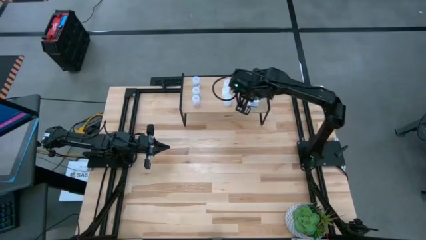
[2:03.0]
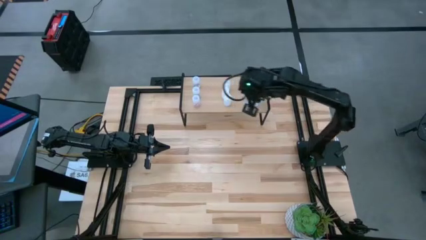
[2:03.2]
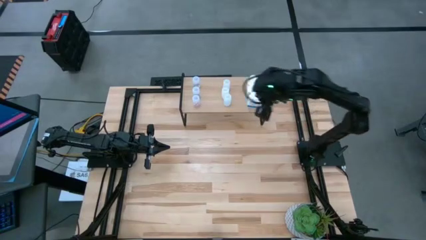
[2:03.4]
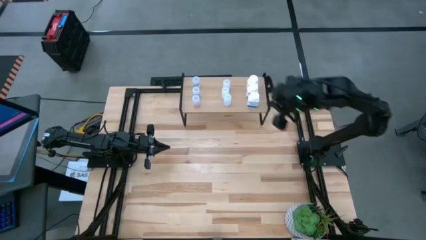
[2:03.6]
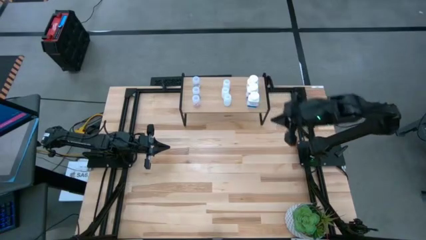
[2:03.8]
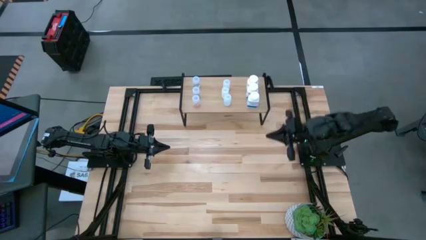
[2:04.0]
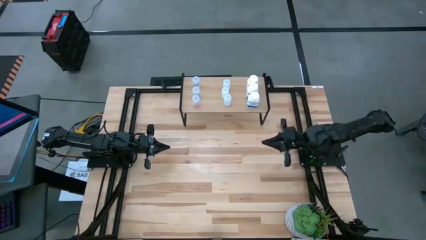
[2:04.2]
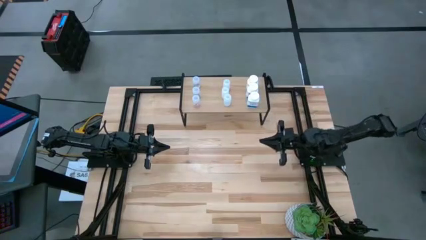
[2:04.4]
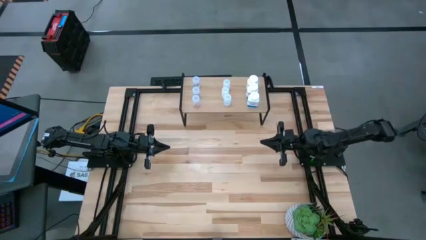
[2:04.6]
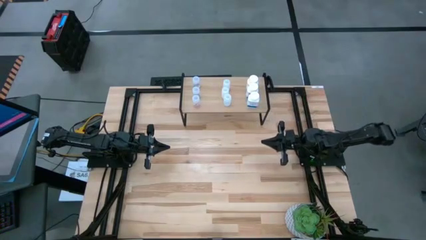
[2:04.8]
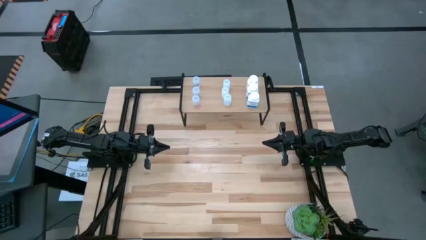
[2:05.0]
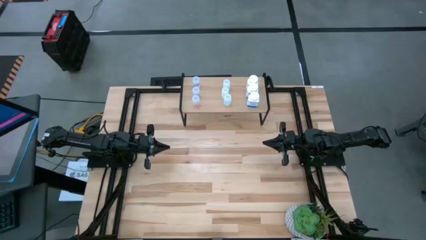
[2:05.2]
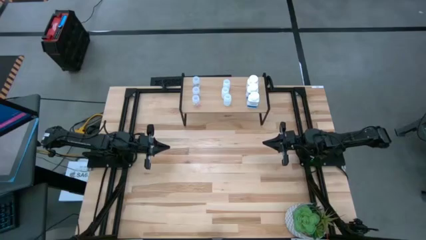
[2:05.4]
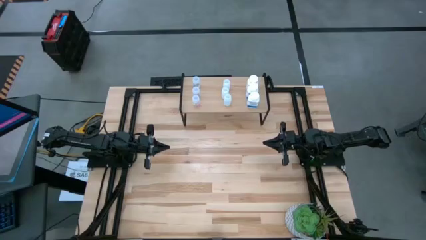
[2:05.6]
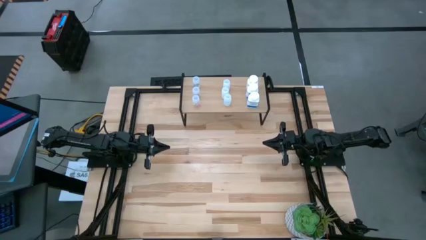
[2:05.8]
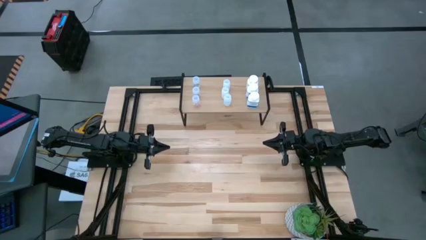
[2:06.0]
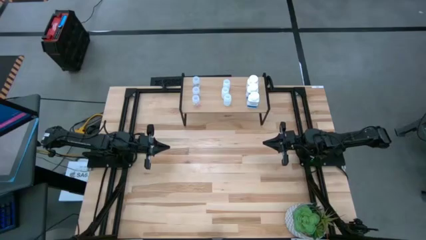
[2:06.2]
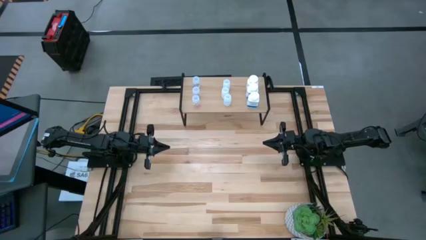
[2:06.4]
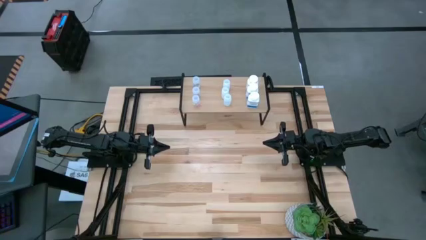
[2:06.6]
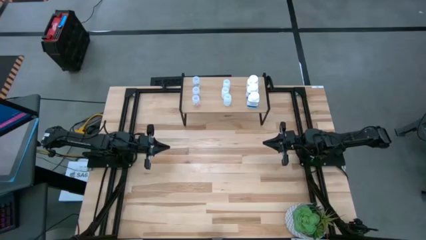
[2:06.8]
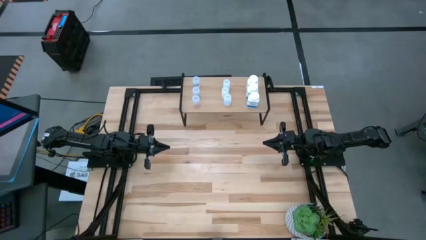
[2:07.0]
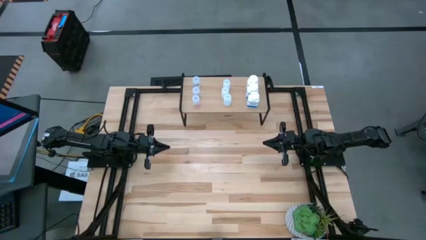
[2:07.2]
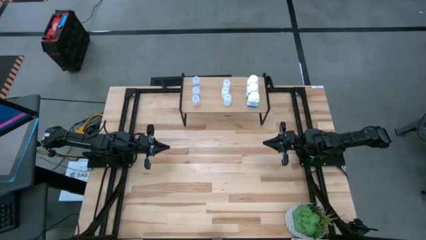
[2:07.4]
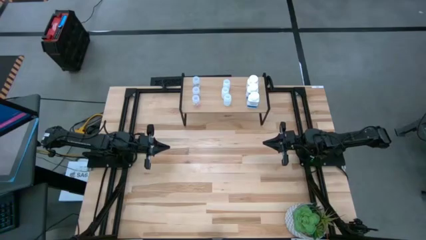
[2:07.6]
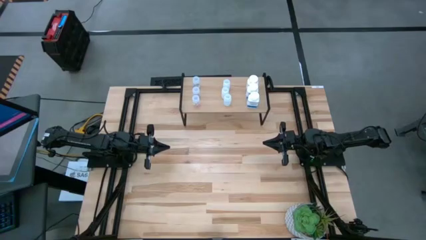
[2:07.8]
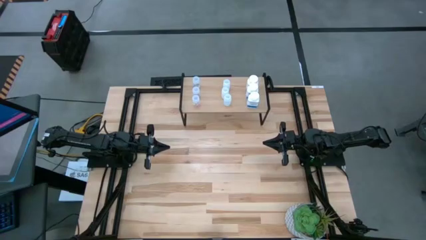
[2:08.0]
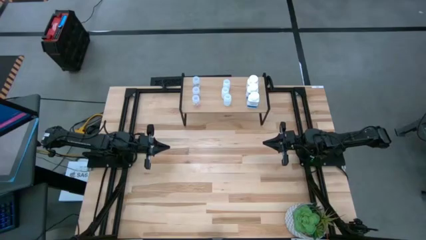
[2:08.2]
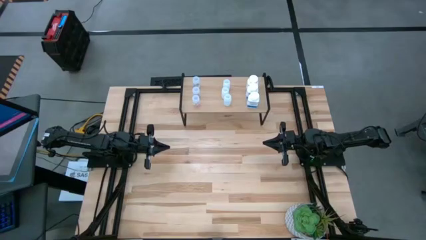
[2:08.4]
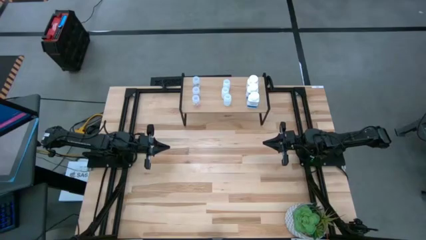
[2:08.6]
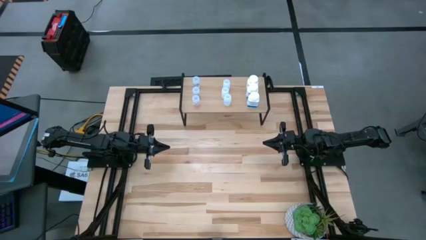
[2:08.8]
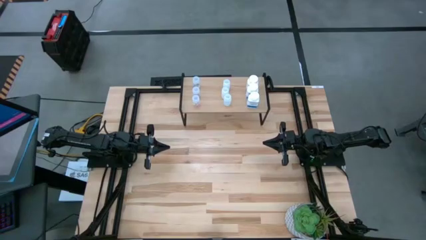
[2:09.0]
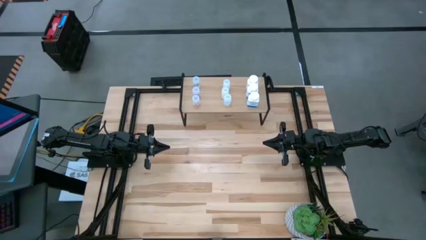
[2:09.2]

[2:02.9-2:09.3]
Task: Pick and place medicine bottles onto shelf by color
Return to Home Position

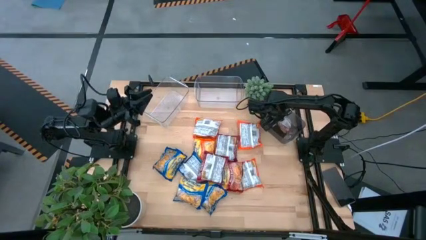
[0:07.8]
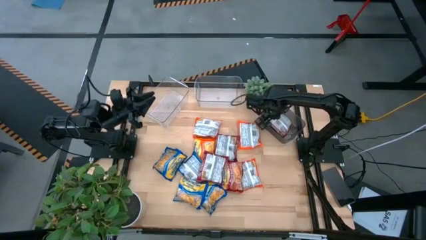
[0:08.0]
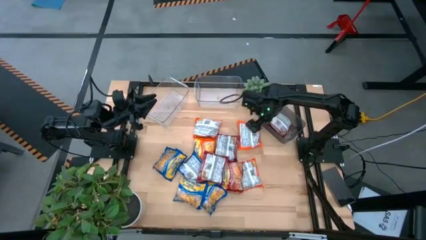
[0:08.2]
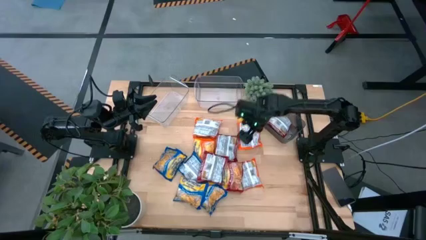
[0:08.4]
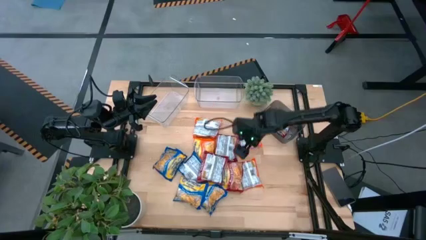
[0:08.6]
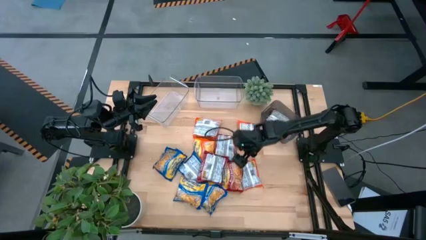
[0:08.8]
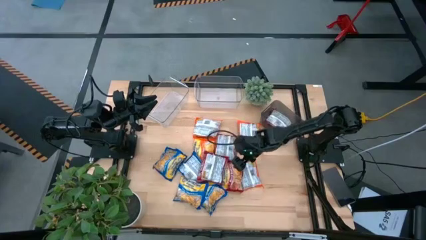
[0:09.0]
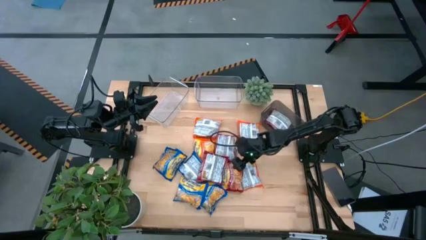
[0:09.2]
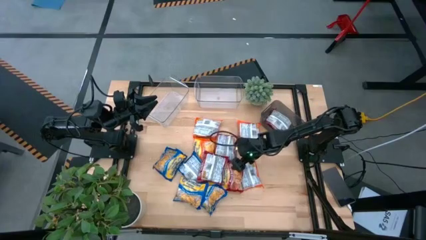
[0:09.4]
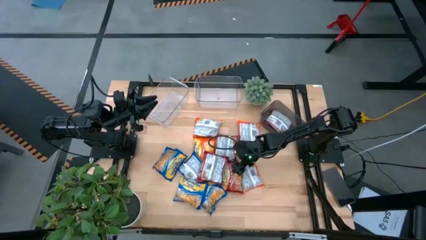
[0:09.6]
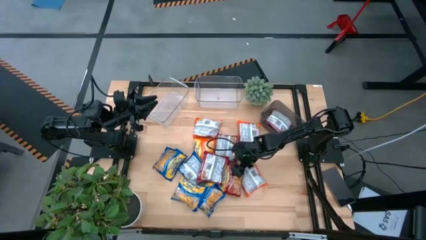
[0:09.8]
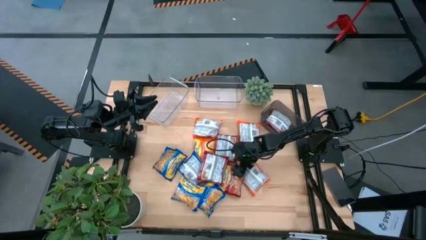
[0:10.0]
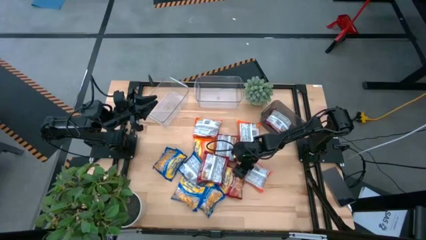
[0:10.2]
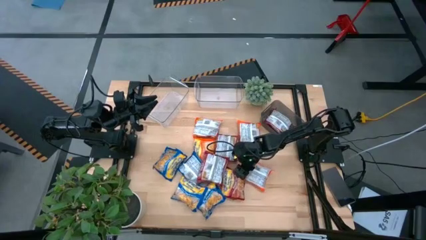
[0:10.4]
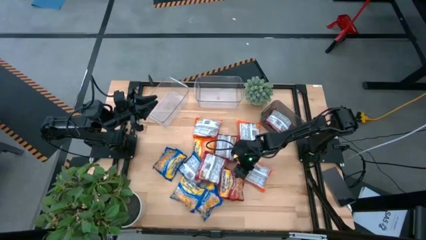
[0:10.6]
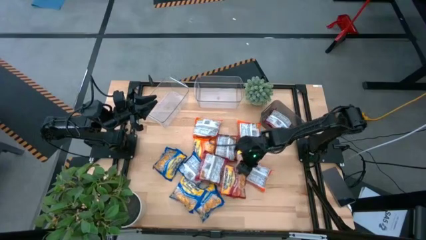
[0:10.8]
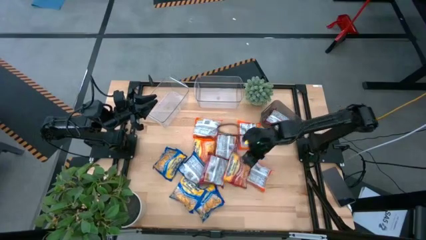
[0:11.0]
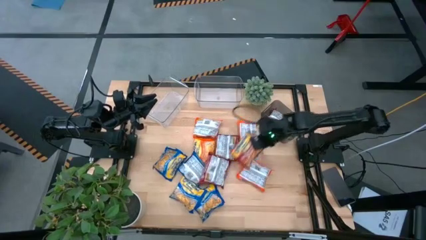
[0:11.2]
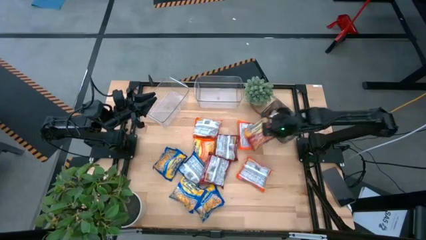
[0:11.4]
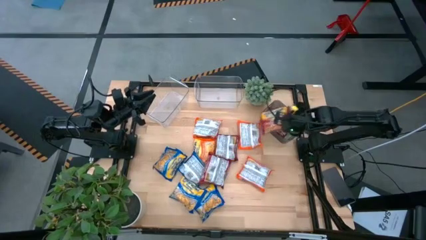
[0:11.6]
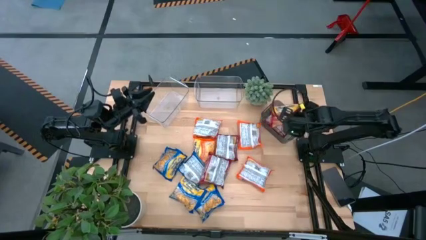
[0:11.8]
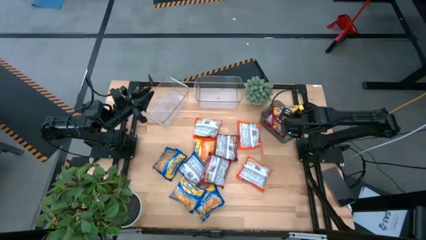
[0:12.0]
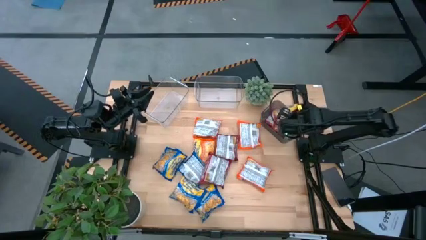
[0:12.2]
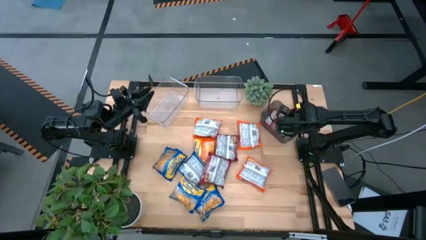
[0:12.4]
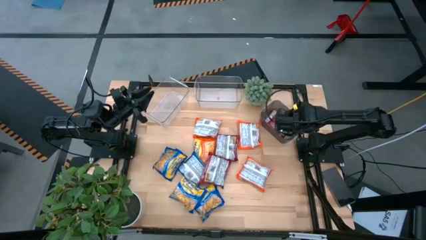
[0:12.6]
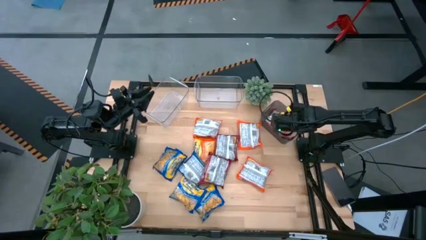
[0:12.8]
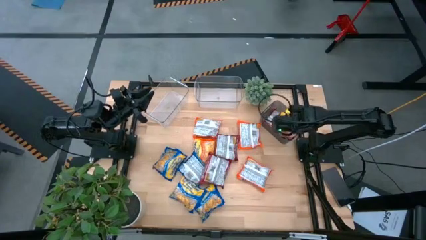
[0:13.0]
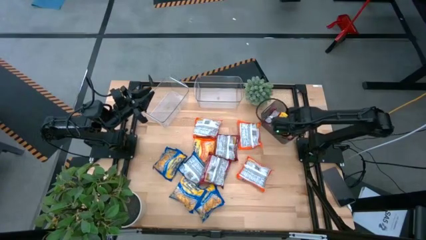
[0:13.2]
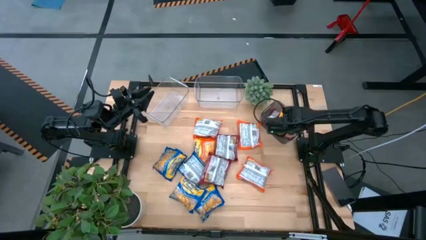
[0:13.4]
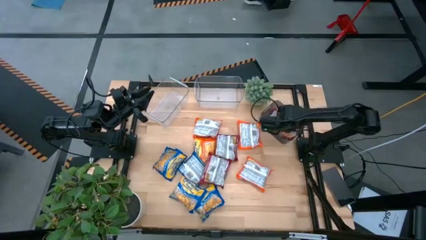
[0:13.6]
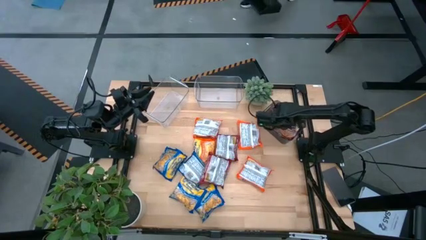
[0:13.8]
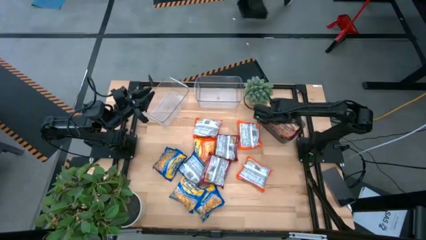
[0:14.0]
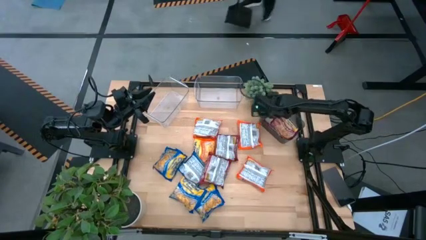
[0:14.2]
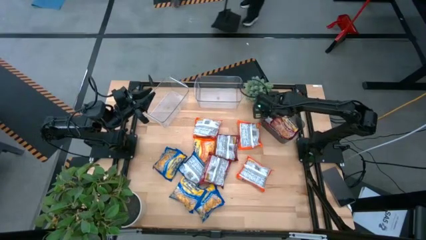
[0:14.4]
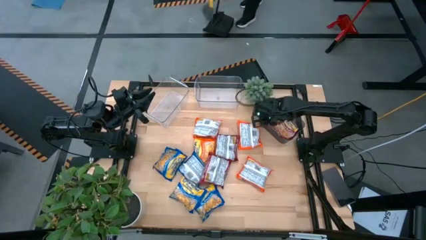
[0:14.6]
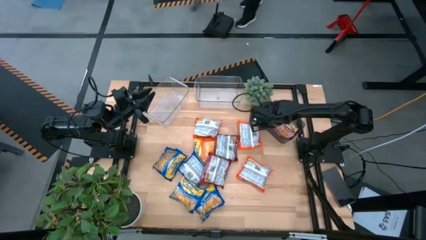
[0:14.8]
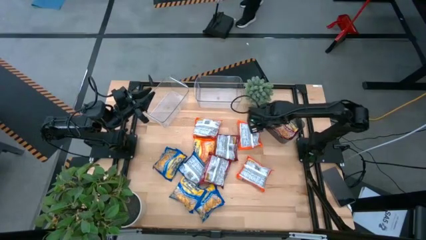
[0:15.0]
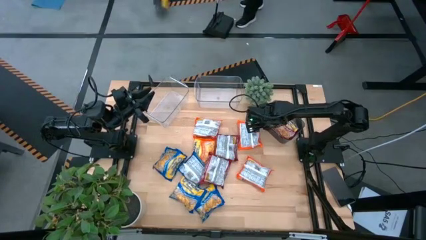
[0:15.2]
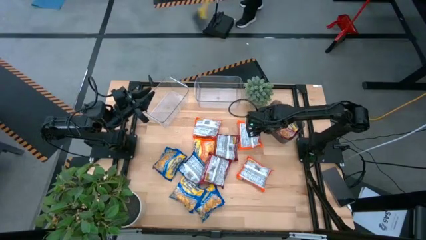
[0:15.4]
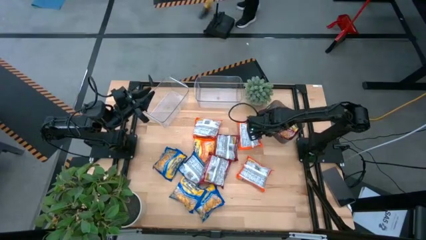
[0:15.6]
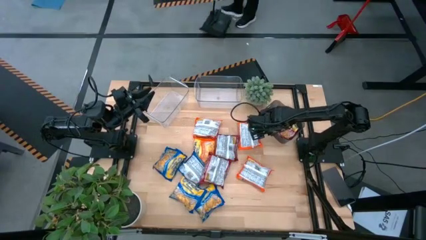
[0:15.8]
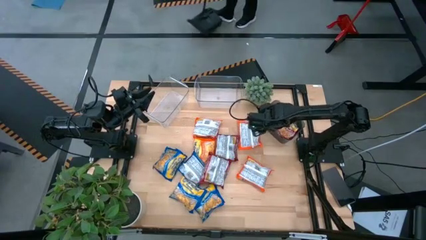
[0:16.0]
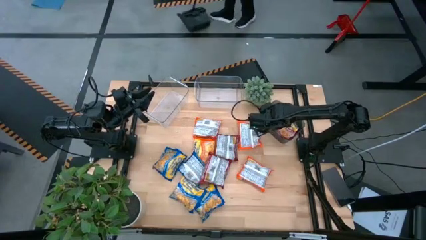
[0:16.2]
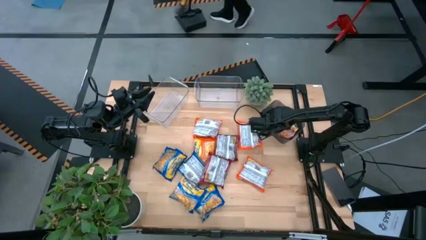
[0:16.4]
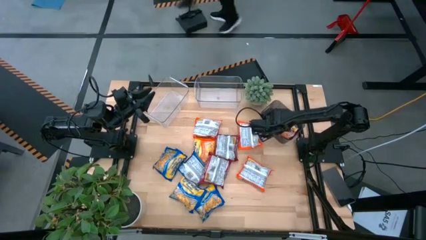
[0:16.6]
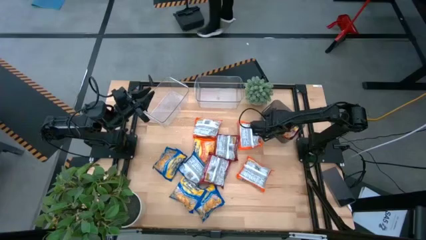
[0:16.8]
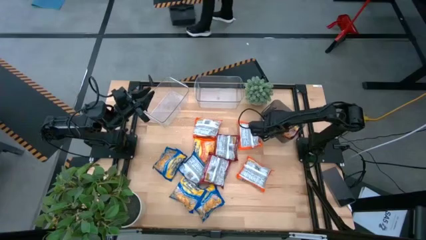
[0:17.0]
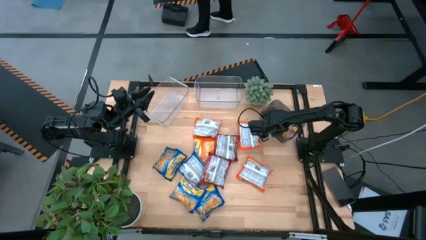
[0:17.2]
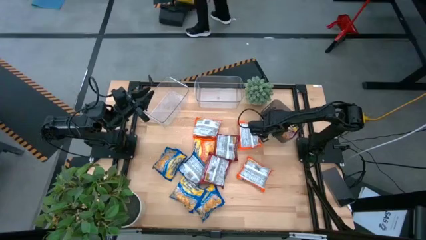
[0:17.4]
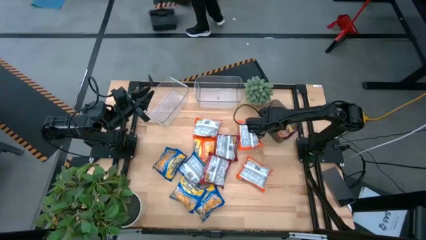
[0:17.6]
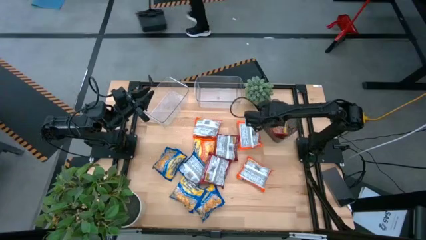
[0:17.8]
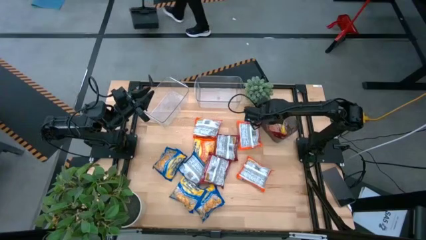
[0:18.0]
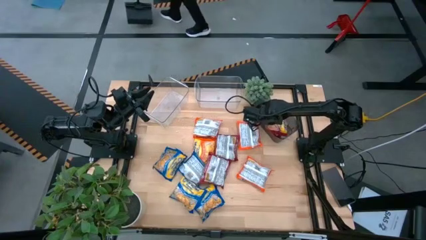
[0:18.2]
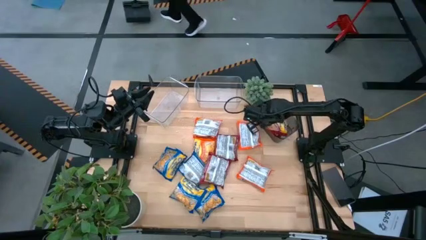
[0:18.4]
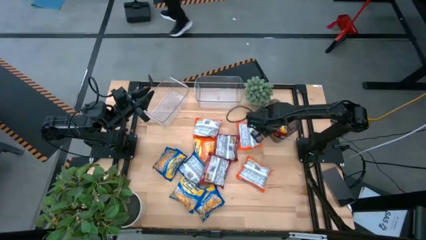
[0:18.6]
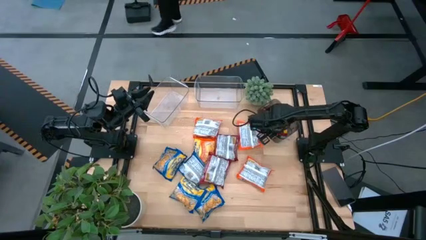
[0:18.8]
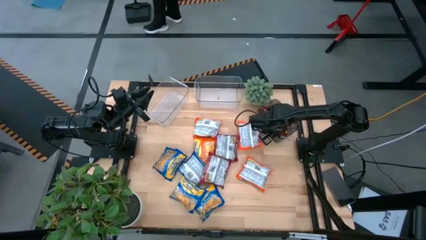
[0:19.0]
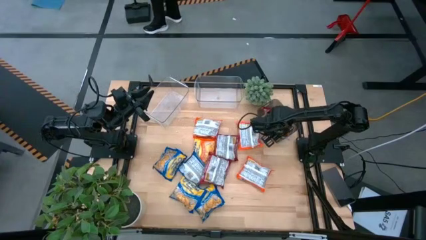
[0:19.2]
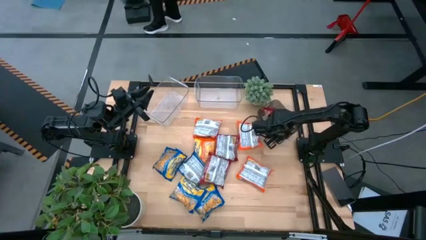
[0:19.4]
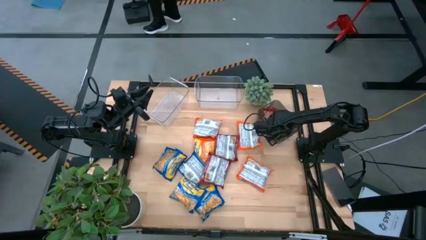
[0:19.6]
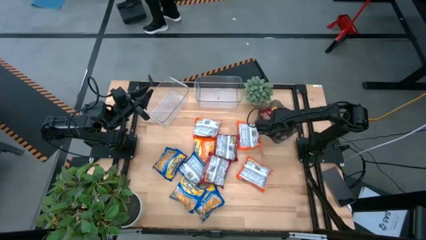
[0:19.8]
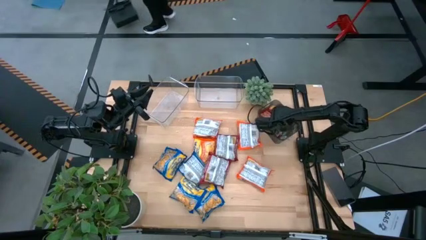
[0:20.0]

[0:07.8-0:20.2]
Task: Sort Maruchan noodles
Put the red noodle pack into the transparent black bin
